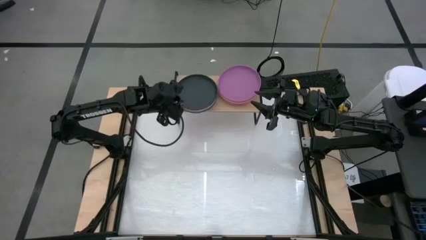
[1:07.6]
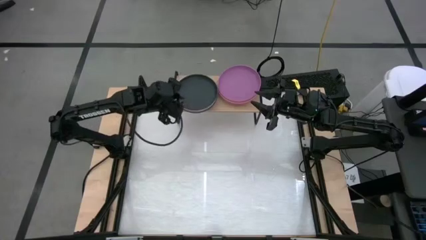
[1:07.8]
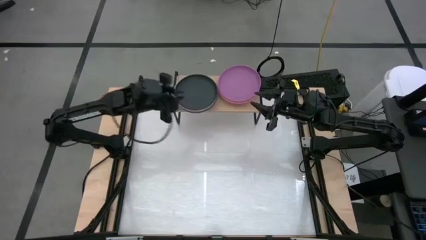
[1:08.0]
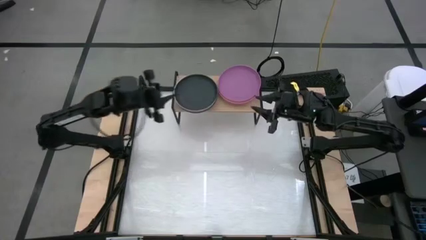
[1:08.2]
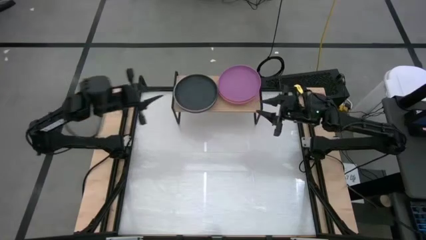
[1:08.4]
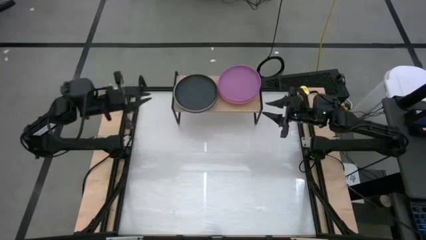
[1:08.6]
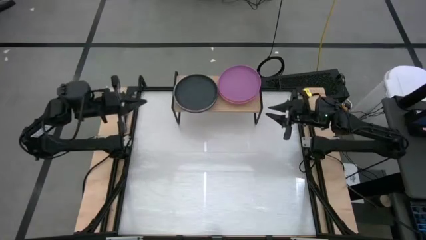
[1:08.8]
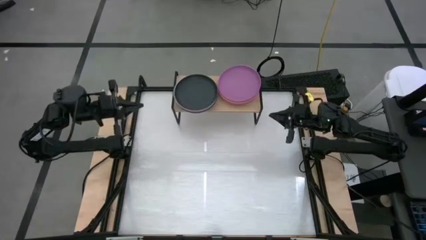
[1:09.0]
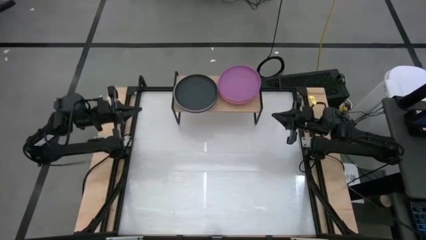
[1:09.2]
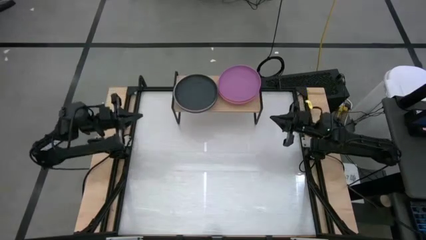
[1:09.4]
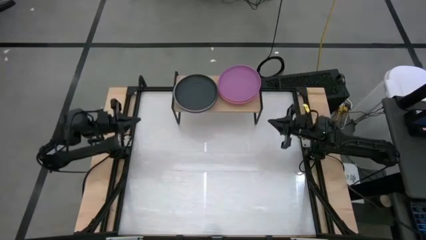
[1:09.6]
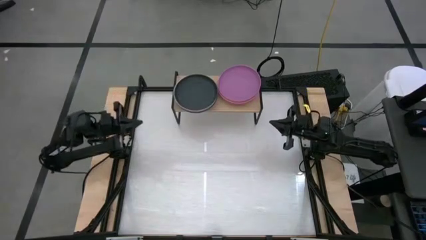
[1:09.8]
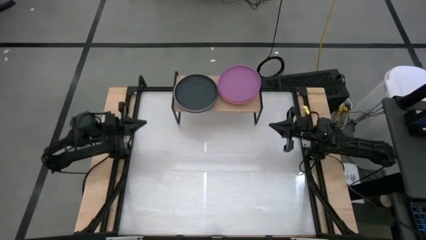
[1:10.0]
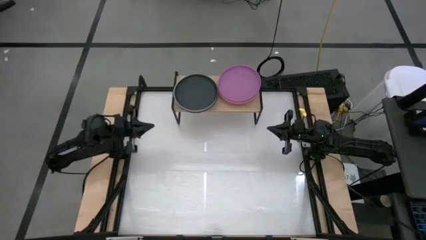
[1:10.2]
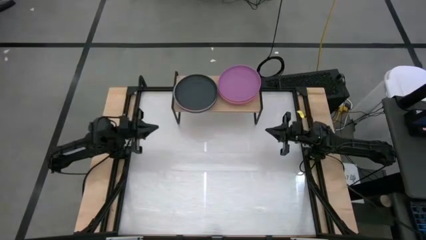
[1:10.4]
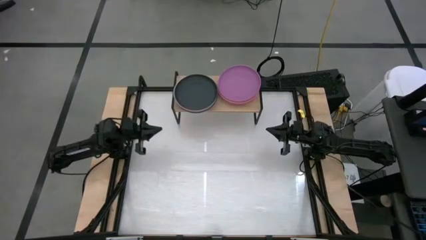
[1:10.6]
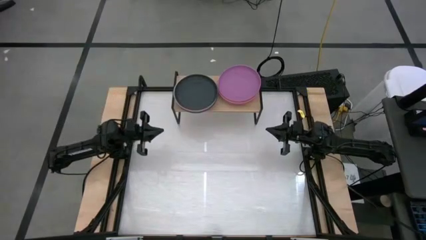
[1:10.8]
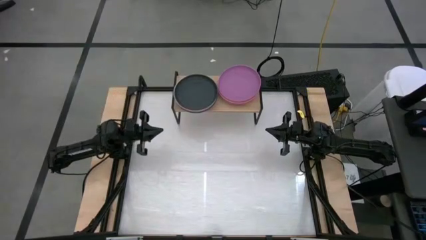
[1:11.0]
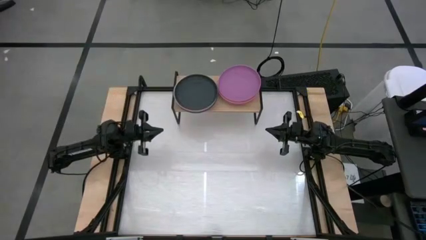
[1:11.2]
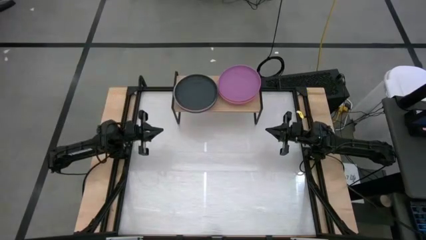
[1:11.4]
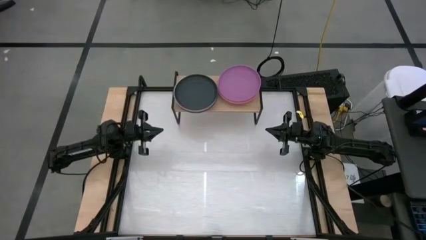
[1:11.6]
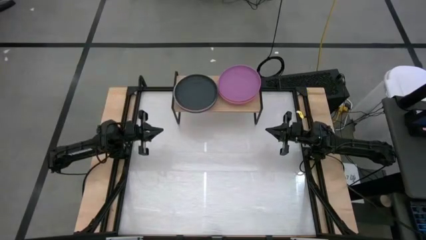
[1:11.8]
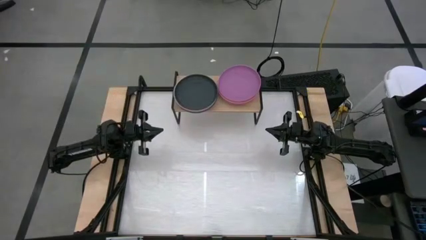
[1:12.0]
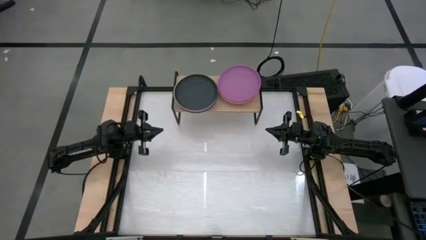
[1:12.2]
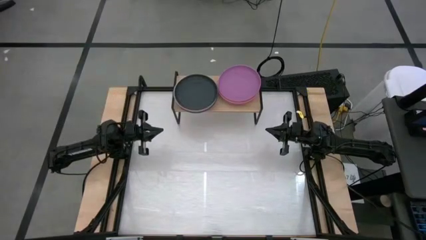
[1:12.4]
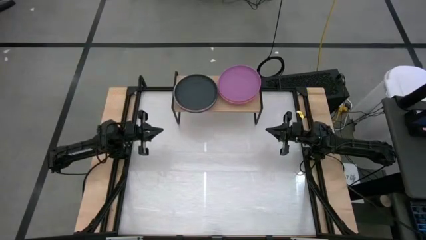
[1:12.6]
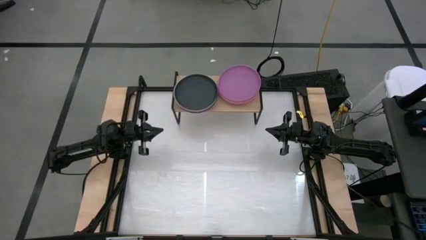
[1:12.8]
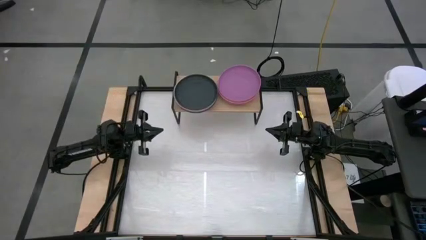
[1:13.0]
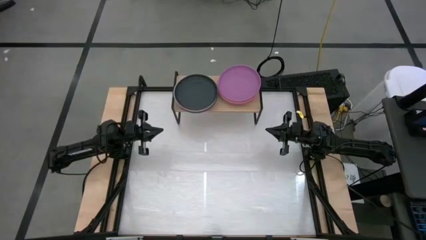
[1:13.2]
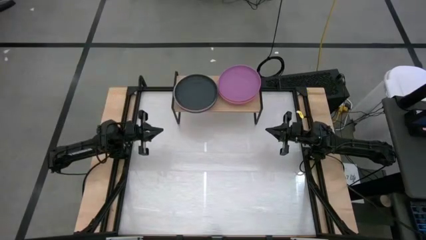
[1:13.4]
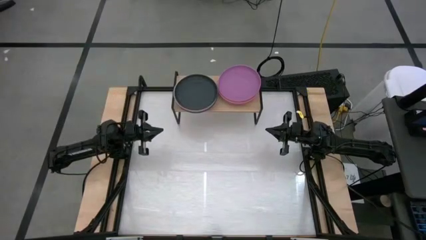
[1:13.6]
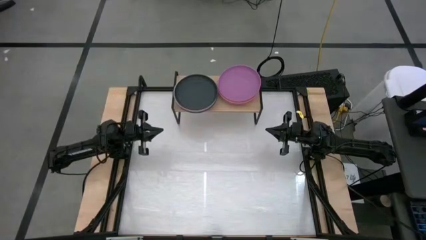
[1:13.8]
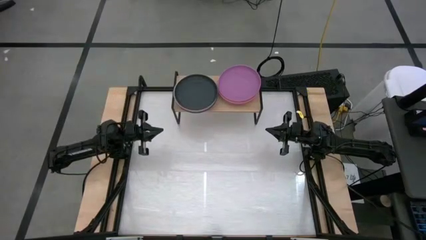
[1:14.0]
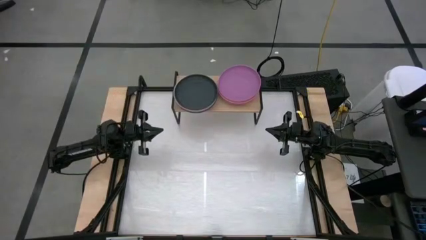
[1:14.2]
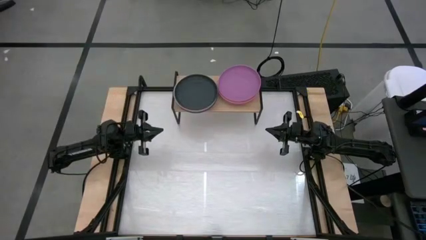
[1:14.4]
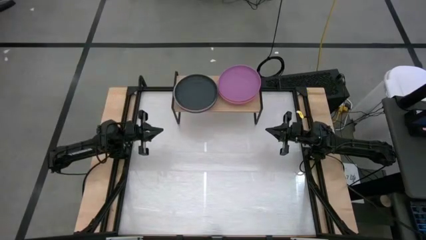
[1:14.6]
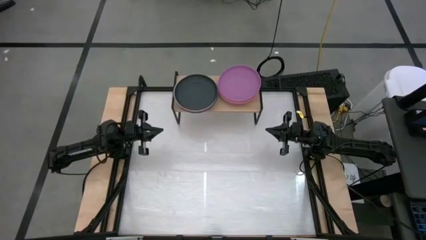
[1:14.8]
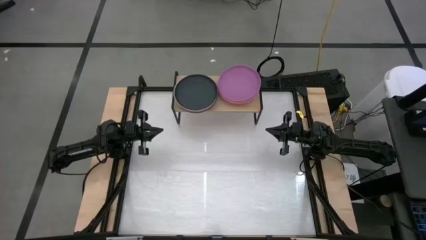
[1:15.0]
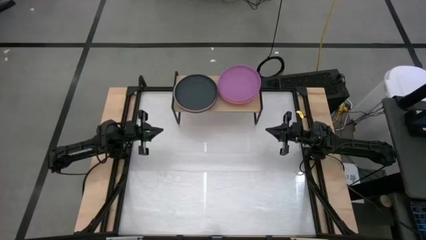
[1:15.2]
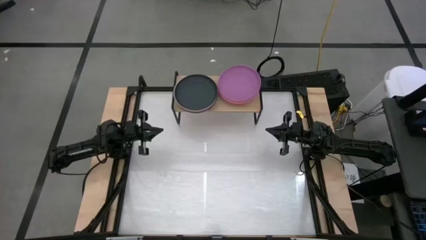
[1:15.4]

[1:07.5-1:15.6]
Task: Place and stack plates onto a shelf
Return to Home Position

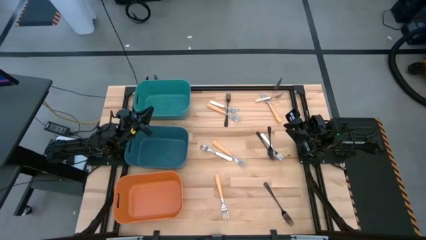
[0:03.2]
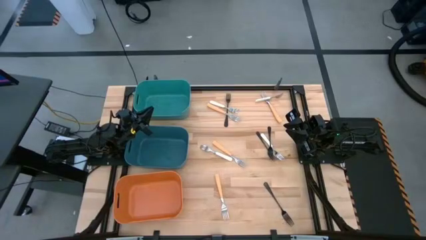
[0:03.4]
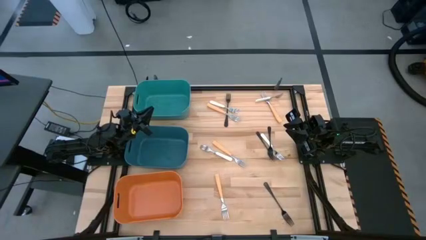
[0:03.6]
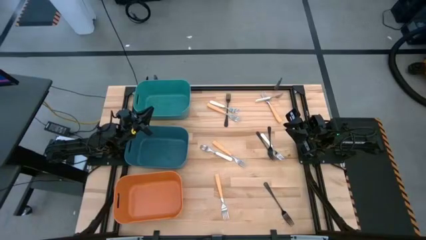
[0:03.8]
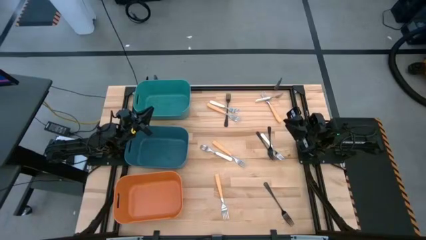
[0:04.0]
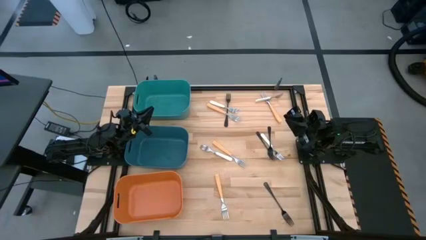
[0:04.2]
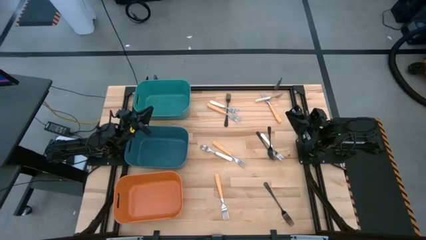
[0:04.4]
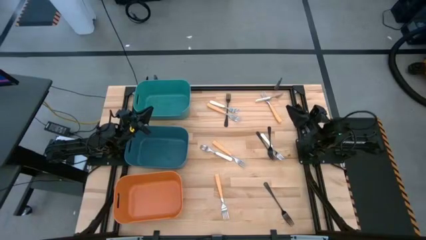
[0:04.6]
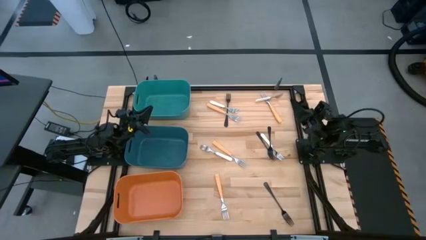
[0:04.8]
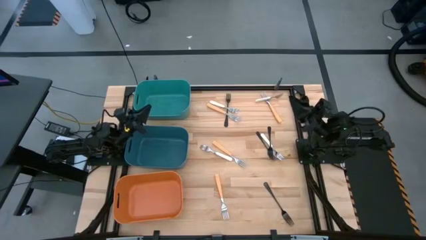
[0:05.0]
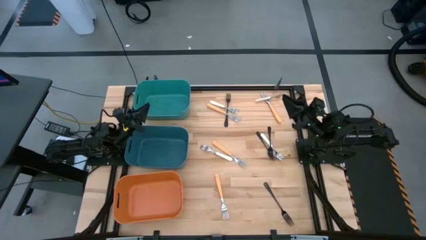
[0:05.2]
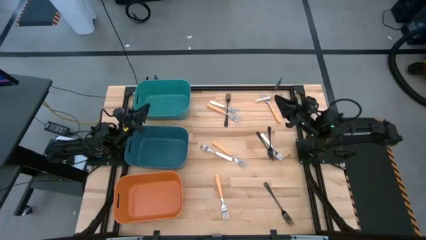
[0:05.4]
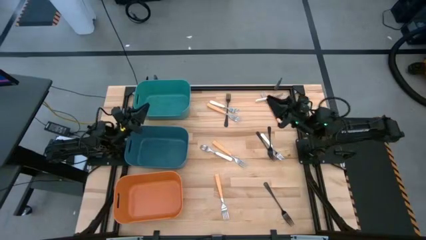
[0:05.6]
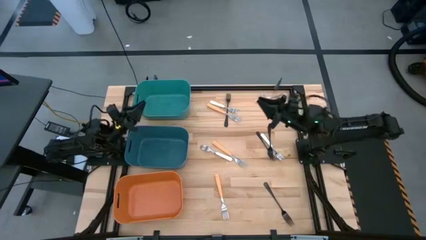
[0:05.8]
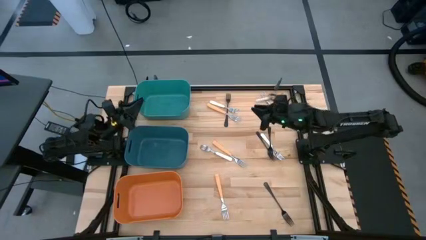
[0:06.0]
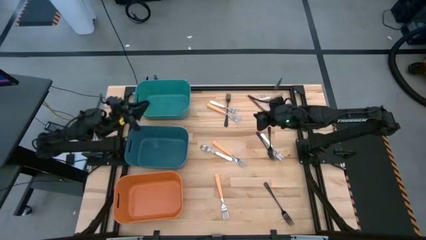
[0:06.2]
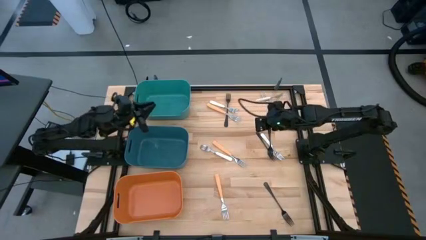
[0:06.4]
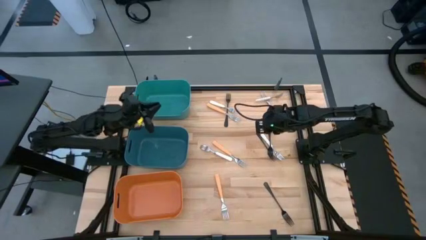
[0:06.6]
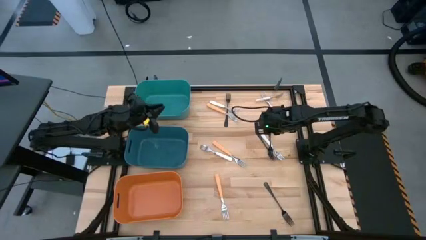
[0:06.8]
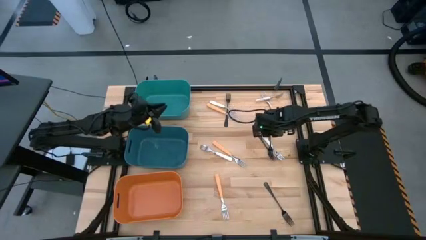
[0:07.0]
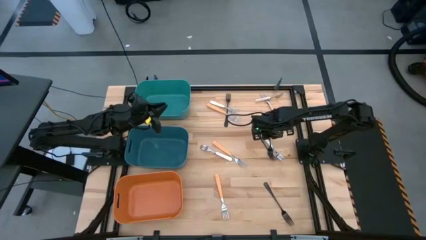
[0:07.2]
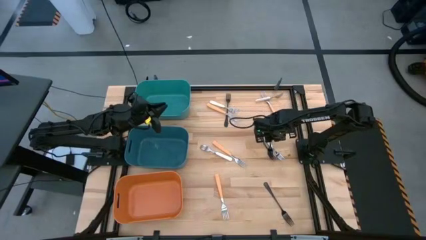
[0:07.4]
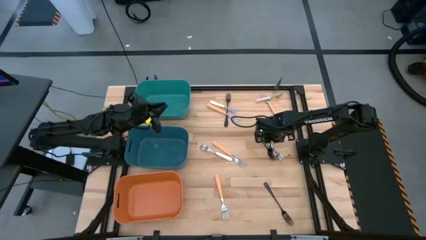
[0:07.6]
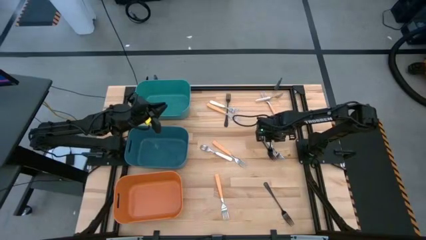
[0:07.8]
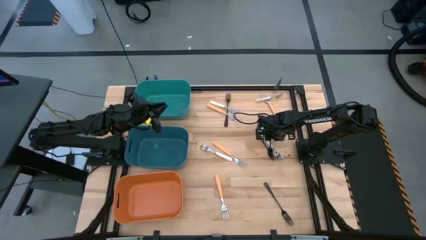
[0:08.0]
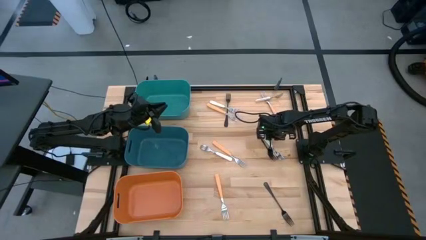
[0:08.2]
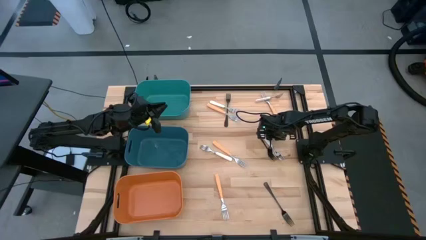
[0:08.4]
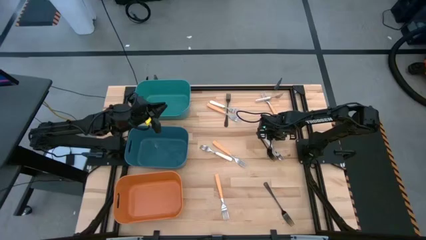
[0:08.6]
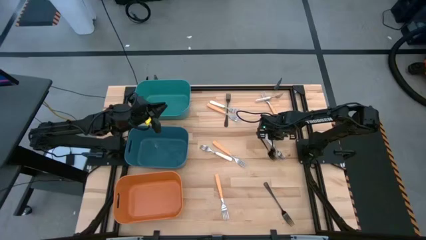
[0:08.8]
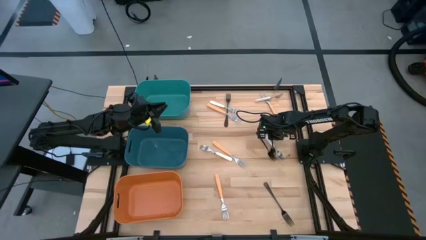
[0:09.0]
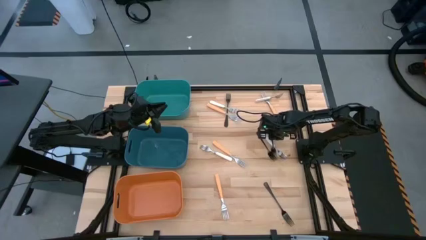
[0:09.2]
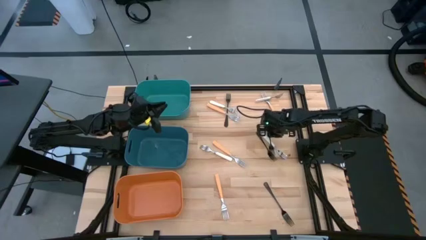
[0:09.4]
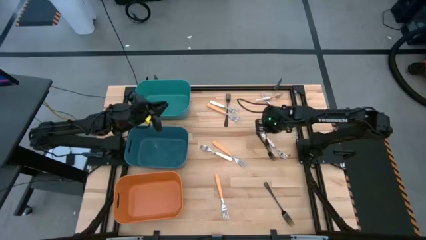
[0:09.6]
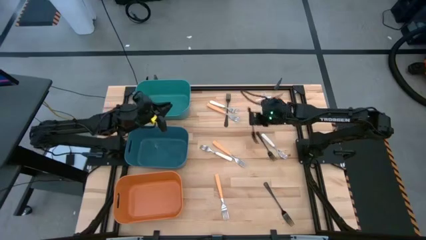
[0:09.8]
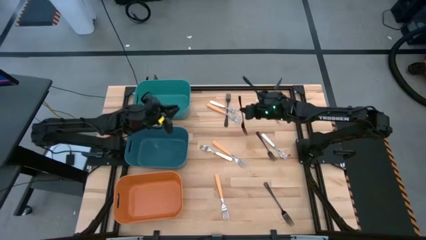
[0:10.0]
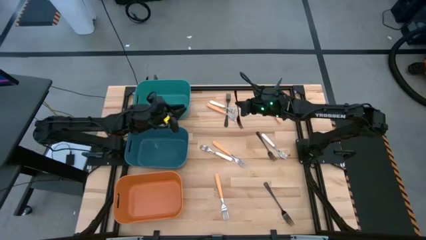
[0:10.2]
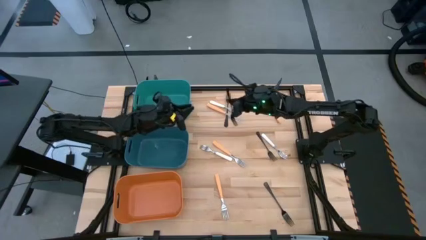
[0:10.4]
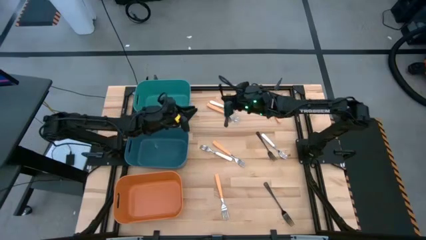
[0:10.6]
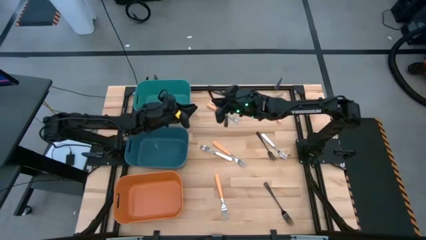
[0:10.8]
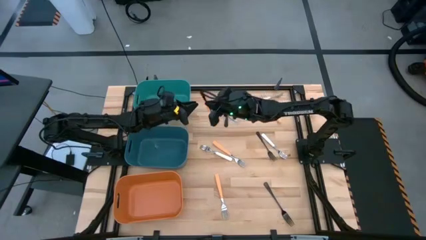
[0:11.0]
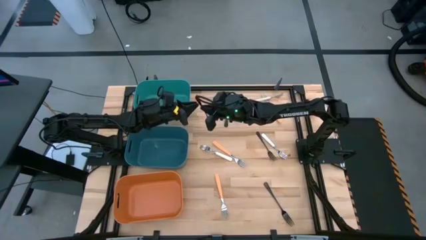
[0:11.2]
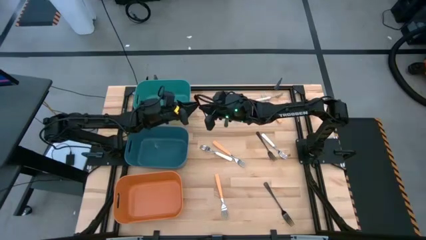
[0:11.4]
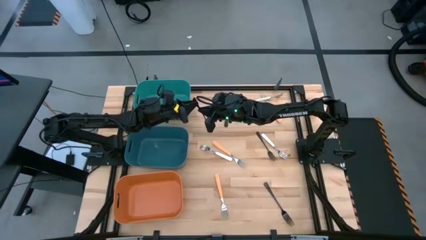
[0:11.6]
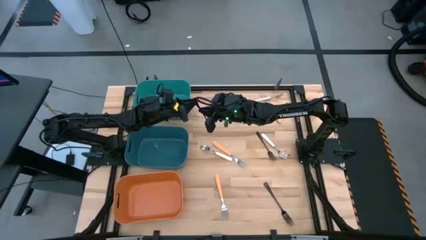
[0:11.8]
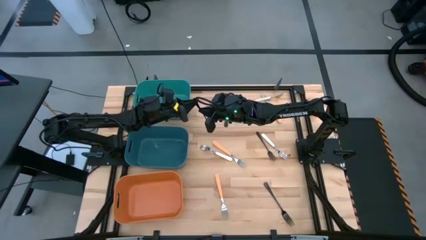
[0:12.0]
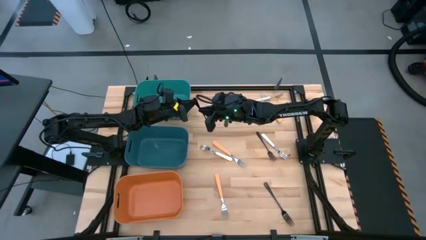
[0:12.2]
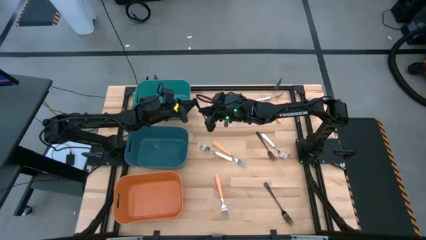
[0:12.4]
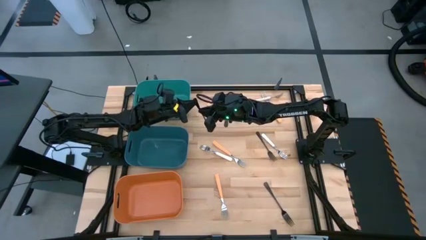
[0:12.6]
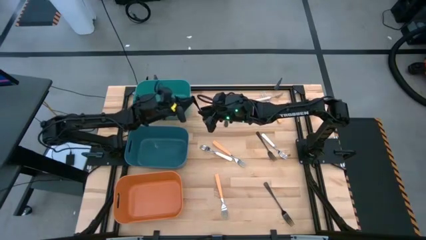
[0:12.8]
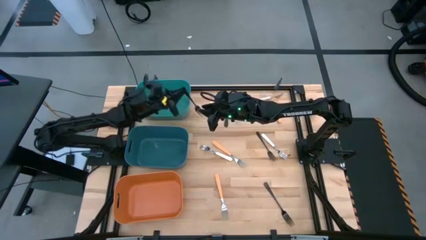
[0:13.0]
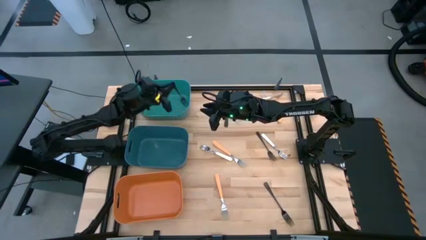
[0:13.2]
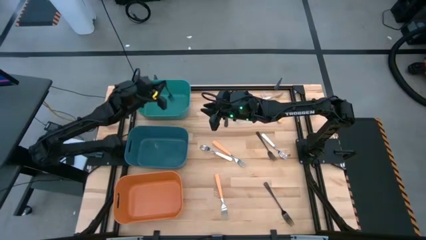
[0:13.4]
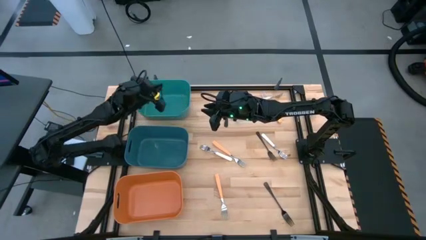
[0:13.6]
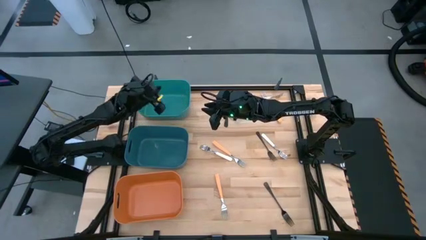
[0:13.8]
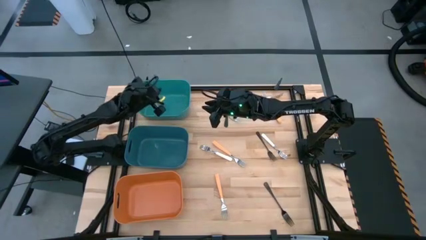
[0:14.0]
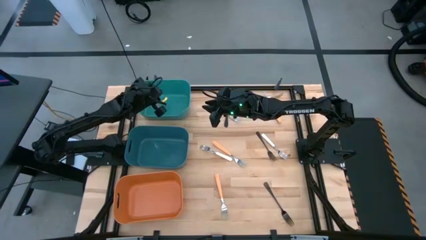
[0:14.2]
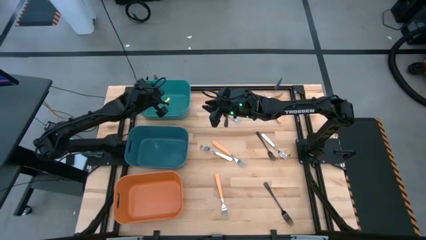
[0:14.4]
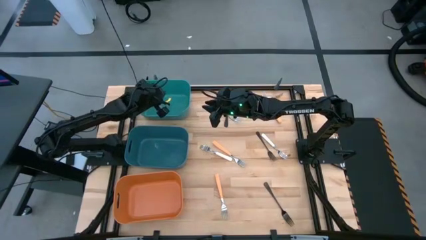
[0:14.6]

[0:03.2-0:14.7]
Task: Sort silverware by color (type)
Put the black fork into the green bin
